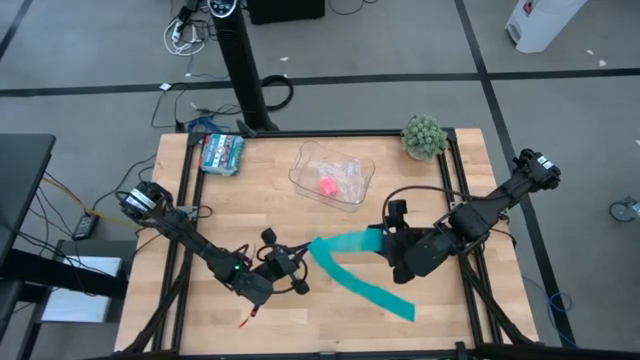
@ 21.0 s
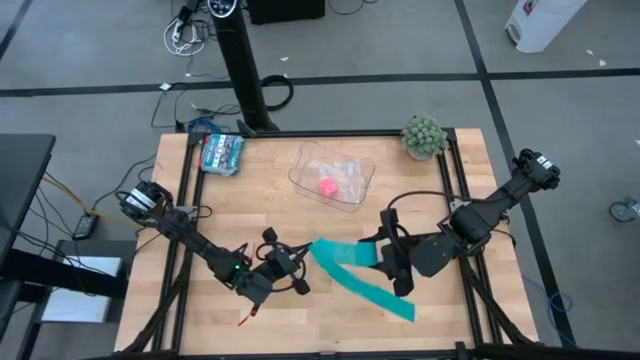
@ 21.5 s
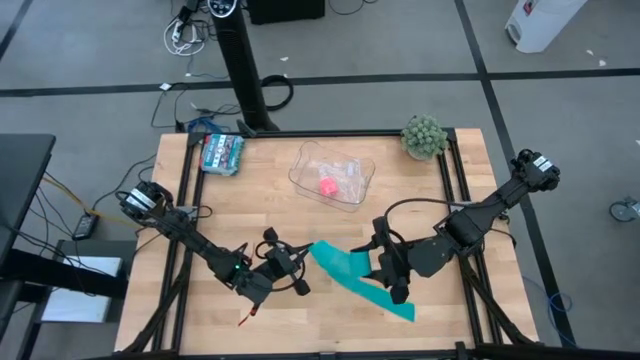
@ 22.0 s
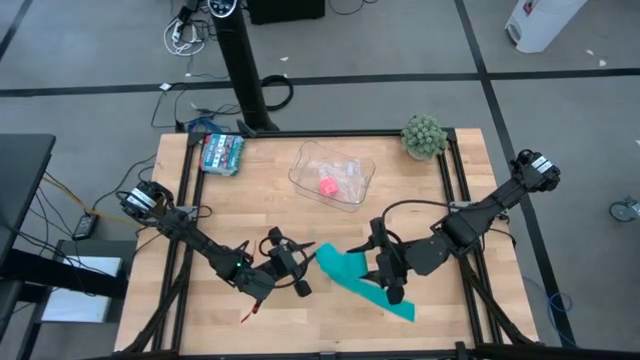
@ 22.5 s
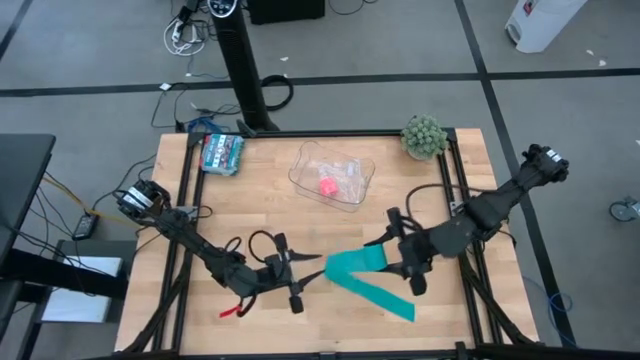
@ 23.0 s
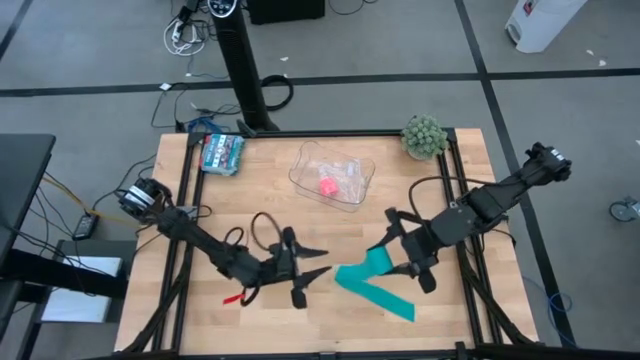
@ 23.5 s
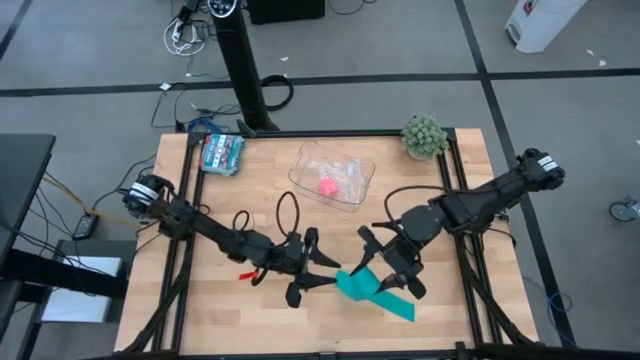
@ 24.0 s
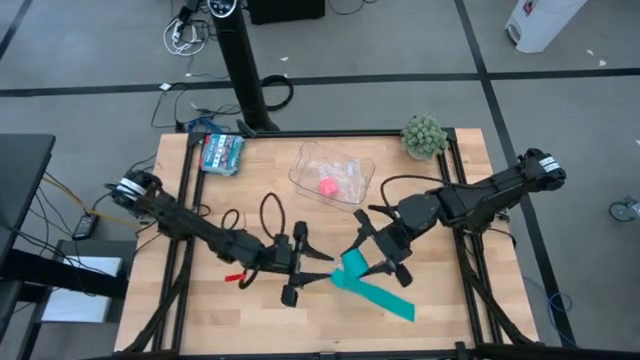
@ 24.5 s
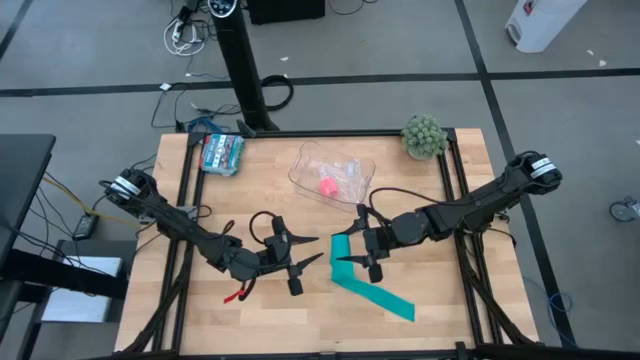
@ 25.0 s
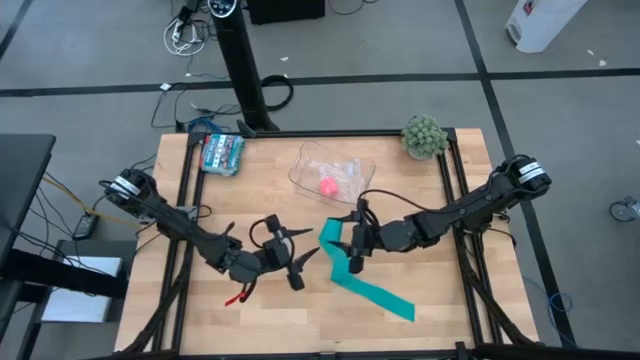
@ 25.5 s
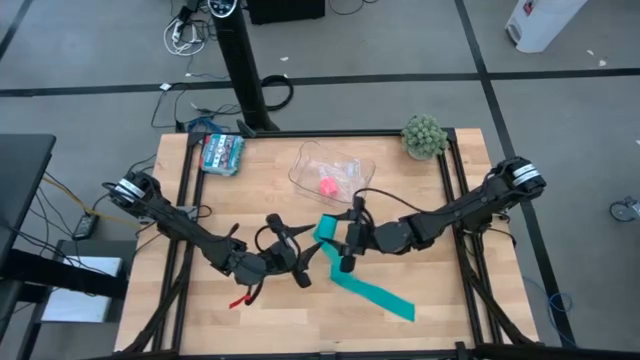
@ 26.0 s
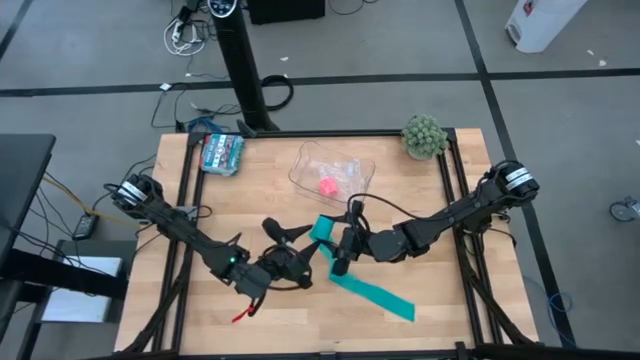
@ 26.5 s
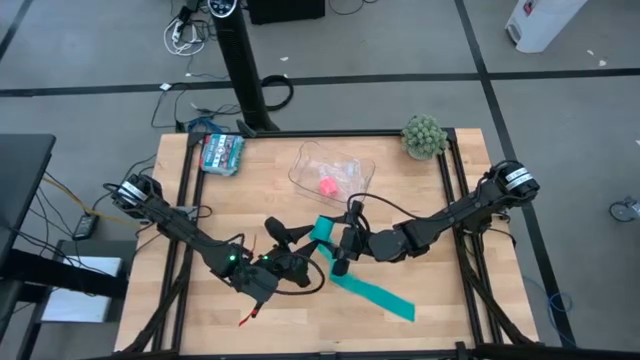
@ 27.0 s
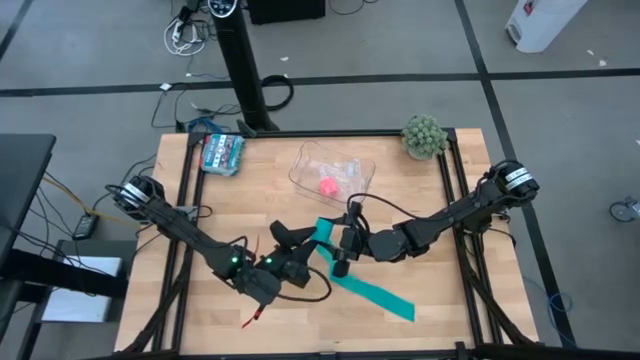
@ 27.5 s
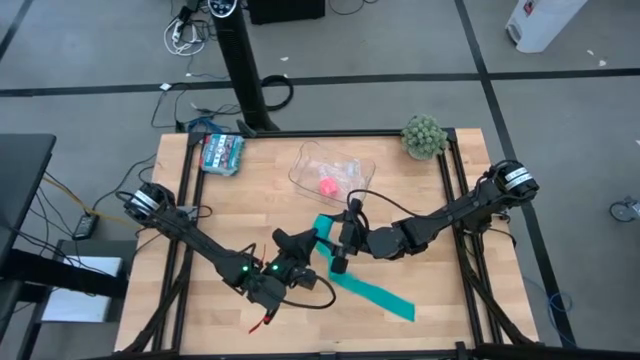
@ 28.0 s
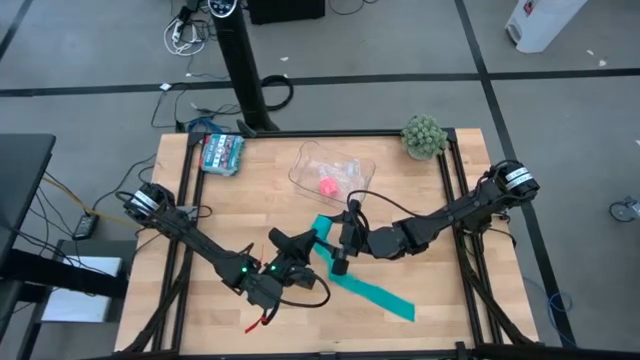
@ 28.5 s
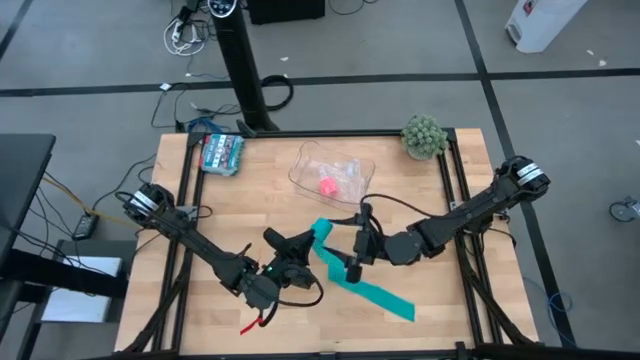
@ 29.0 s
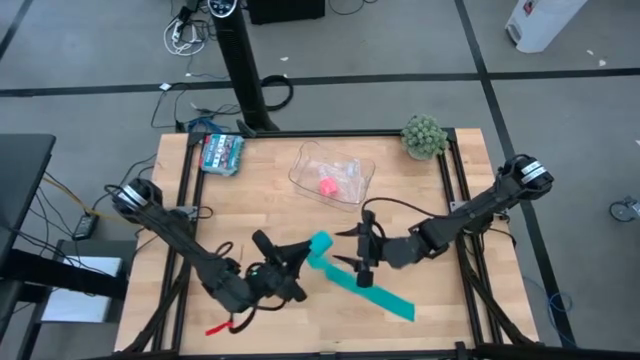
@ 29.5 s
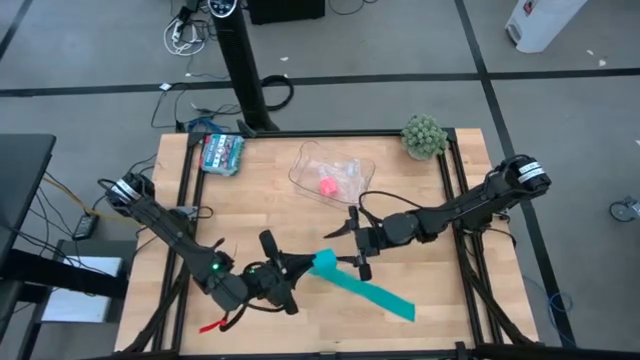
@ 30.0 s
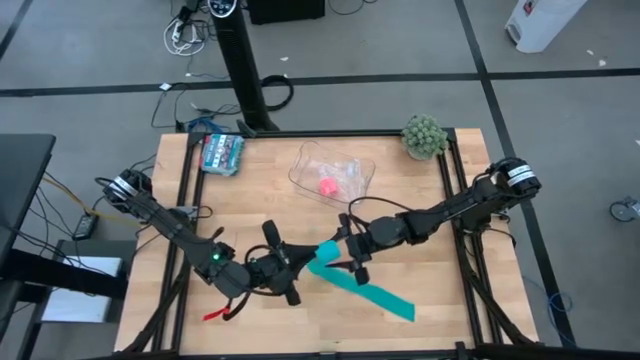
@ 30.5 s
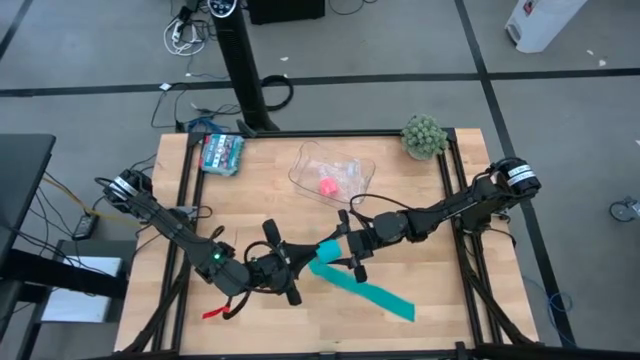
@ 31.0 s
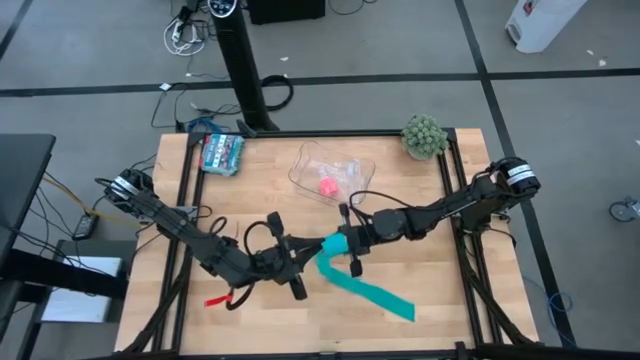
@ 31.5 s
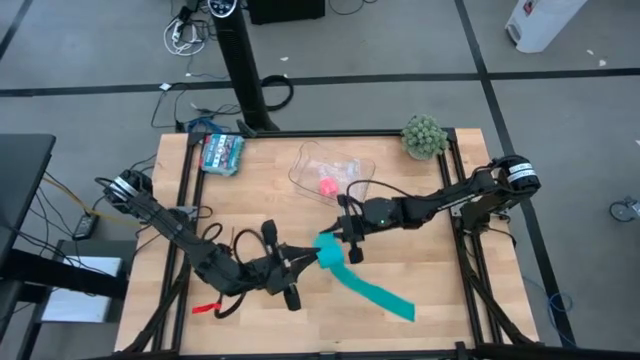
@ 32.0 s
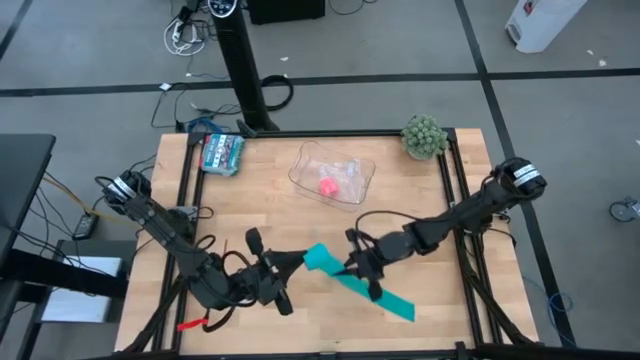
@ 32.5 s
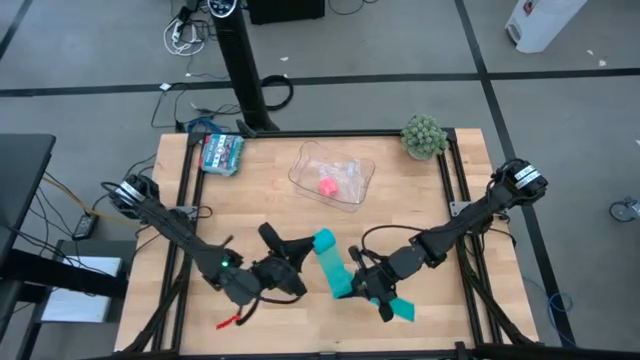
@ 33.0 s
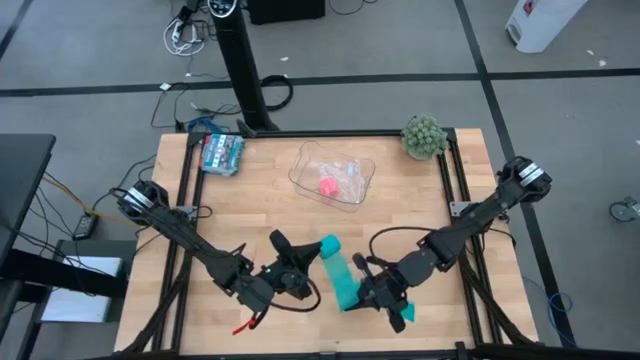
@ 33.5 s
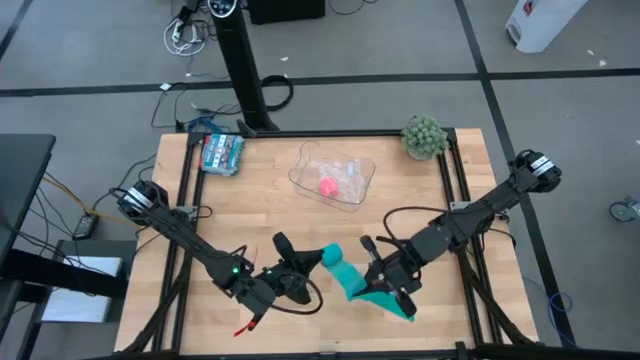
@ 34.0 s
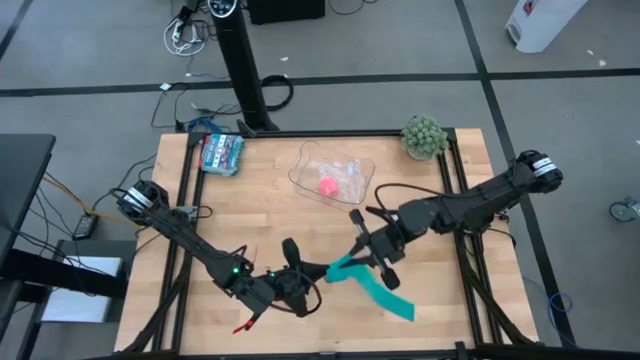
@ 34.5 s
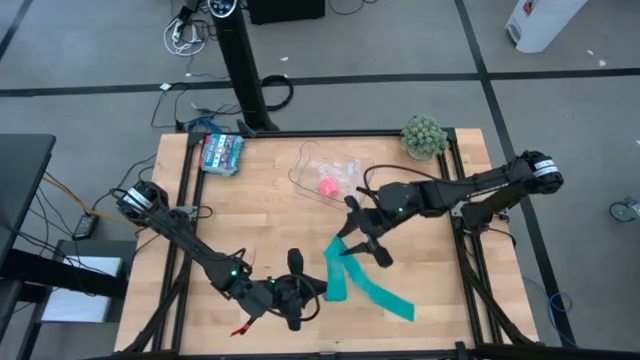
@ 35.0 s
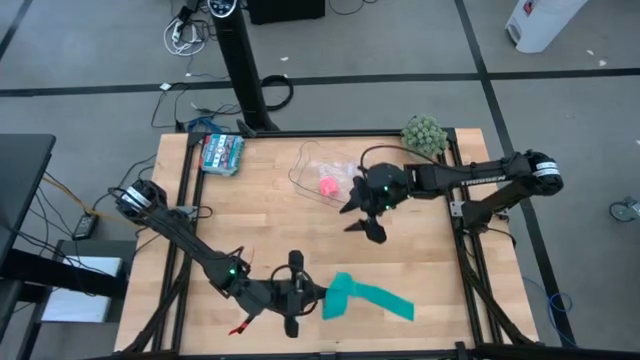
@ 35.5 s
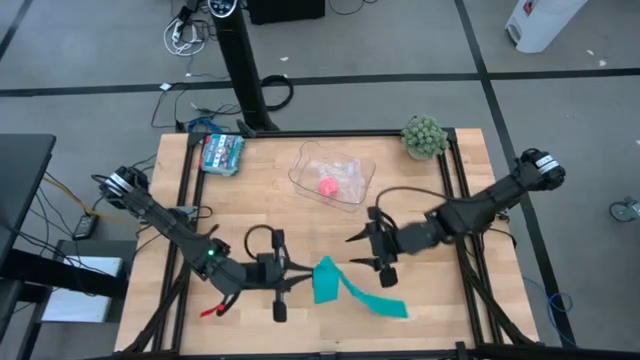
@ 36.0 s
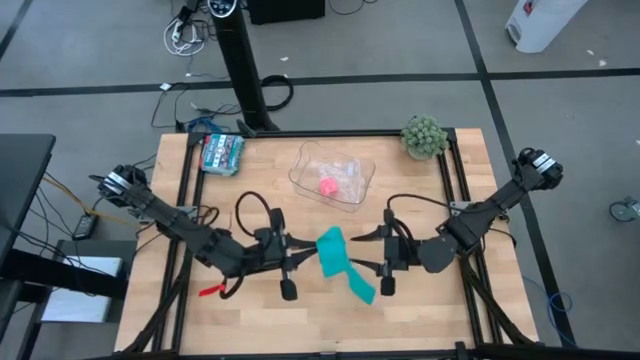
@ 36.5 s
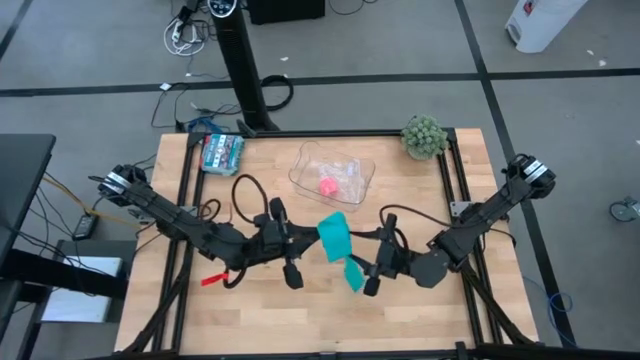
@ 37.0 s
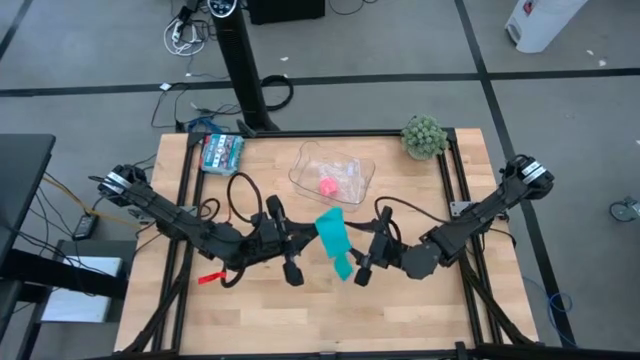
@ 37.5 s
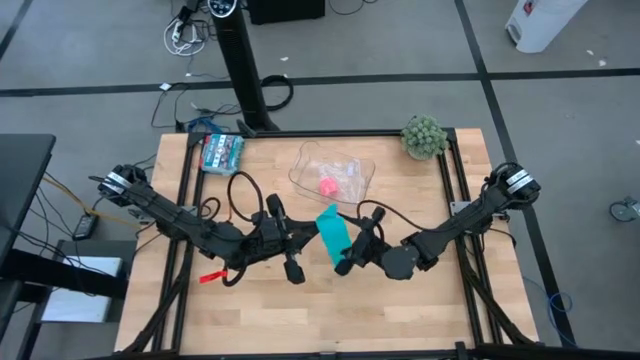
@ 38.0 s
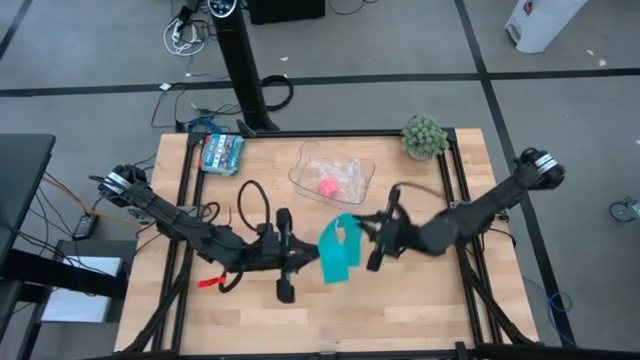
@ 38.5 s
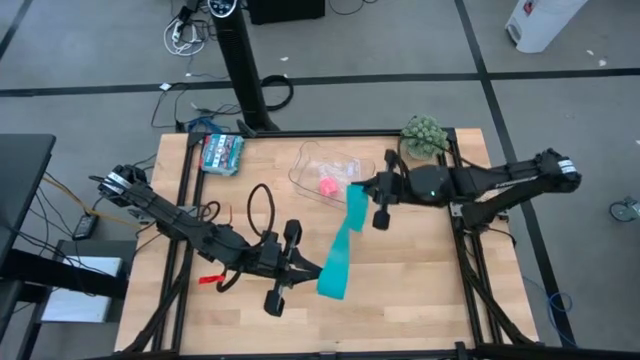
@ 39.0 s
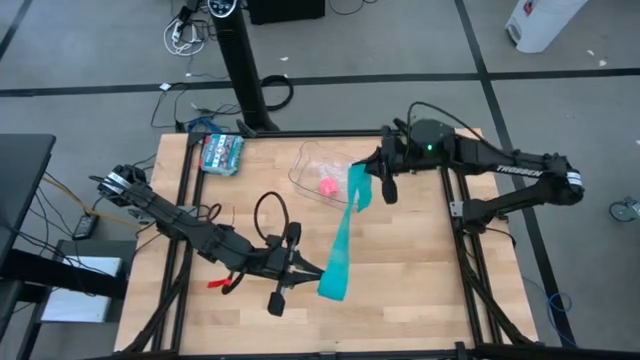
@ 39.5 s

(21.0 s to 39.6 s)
Task: Roll bandage
Roll the blue bandage
